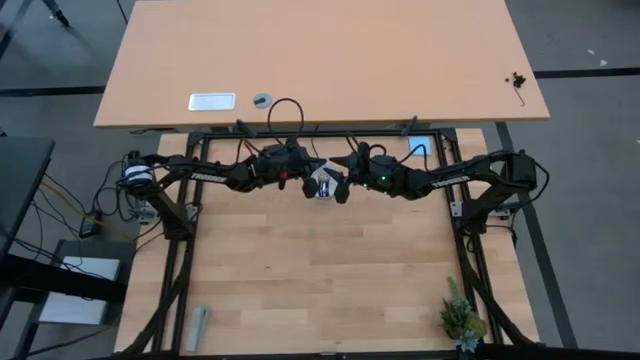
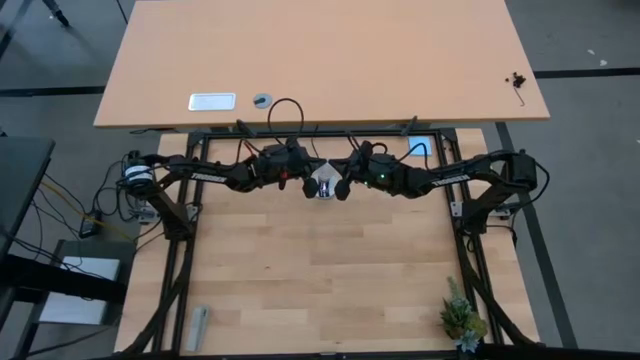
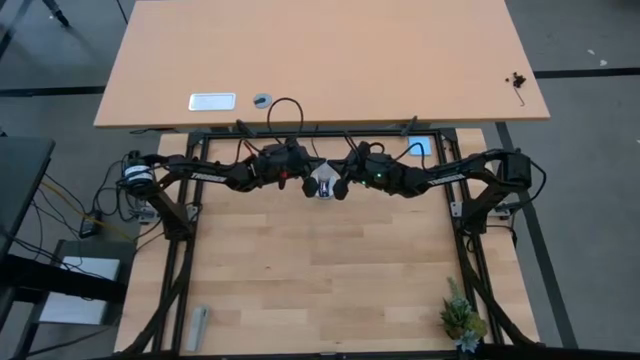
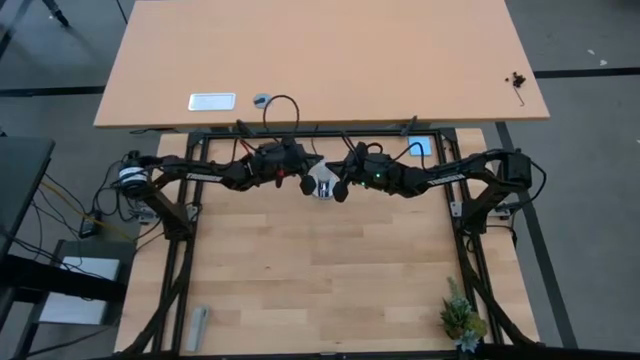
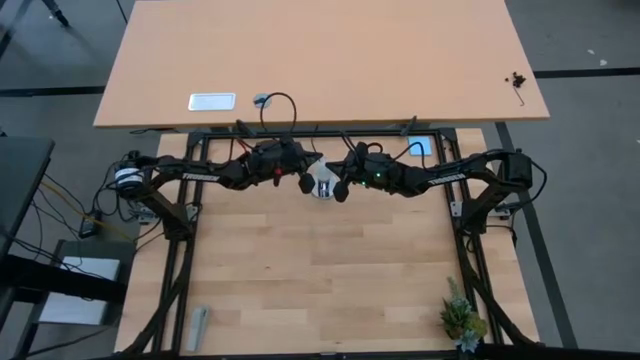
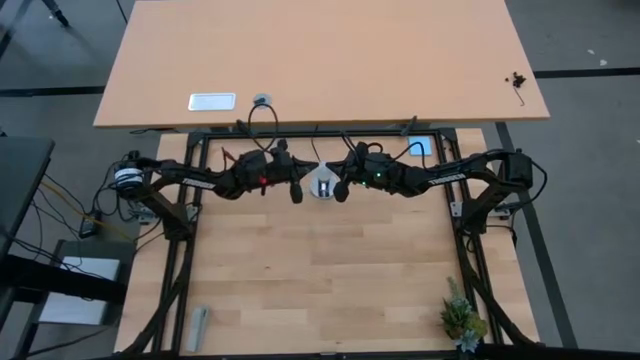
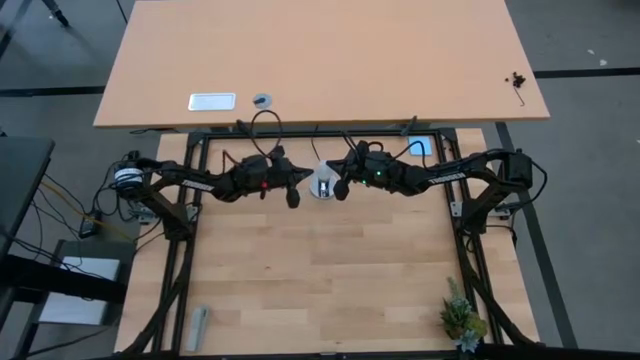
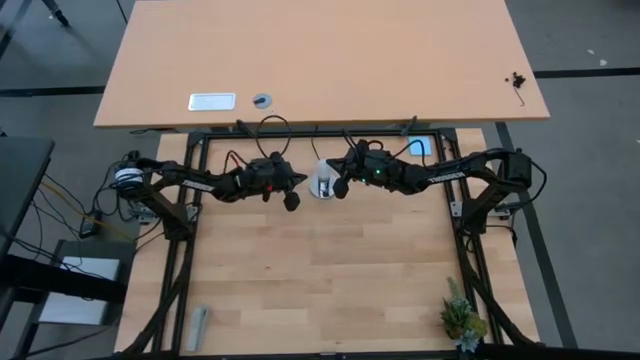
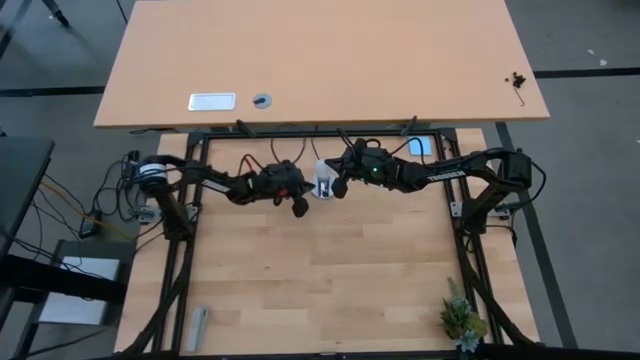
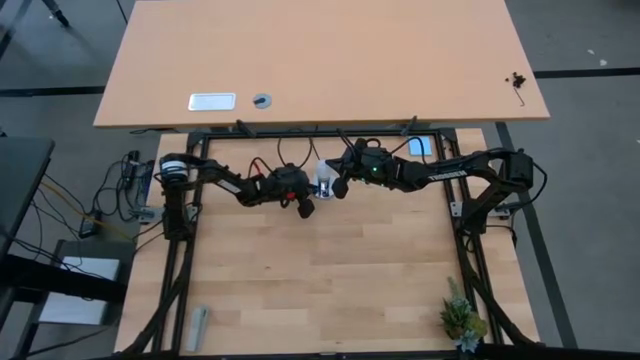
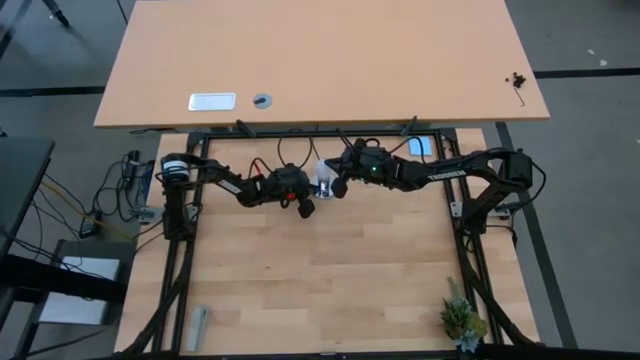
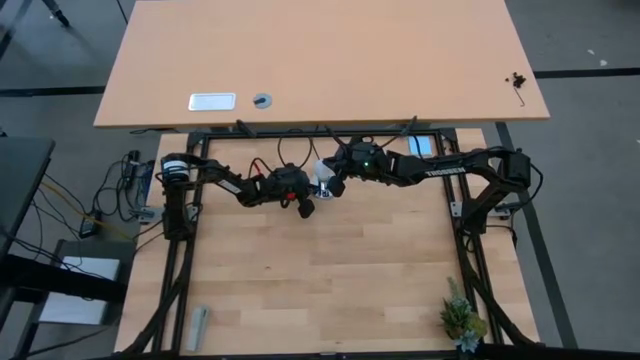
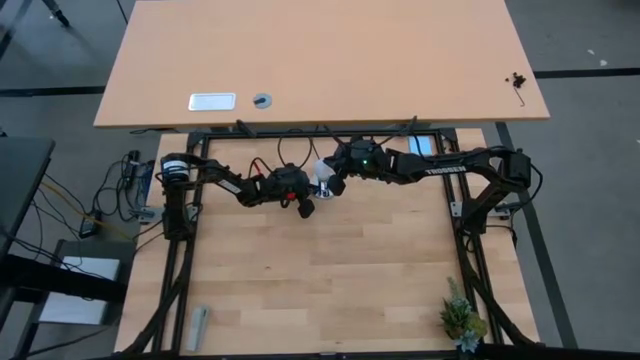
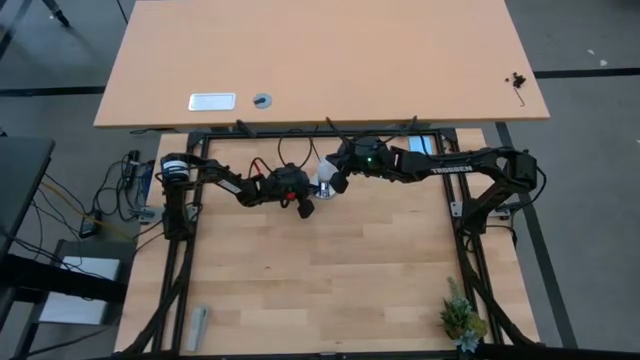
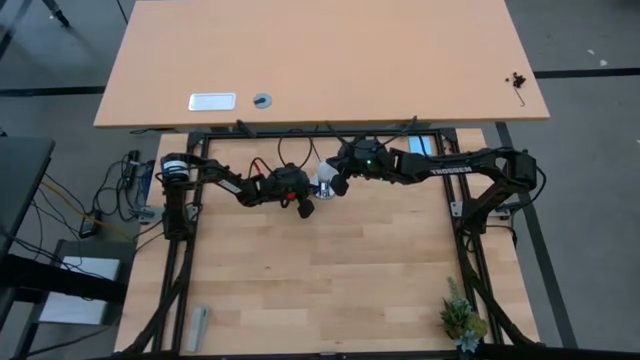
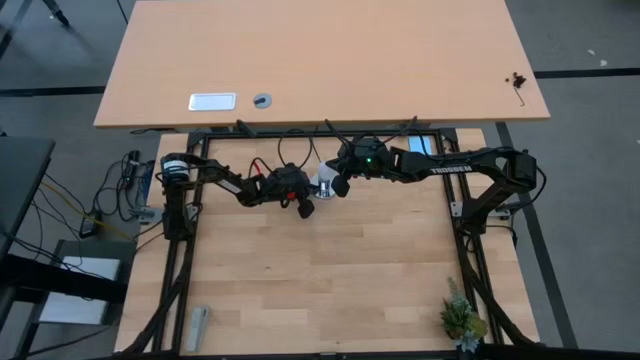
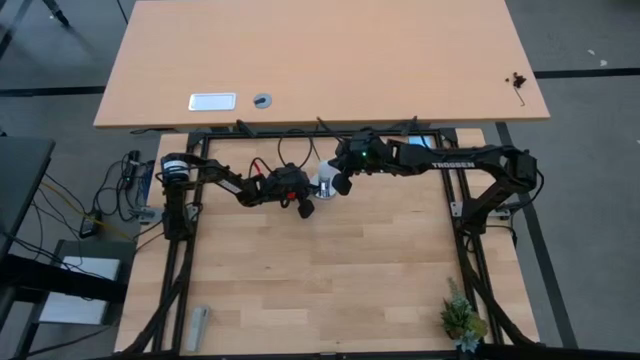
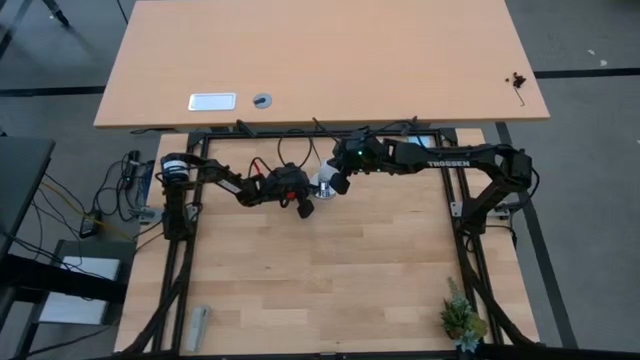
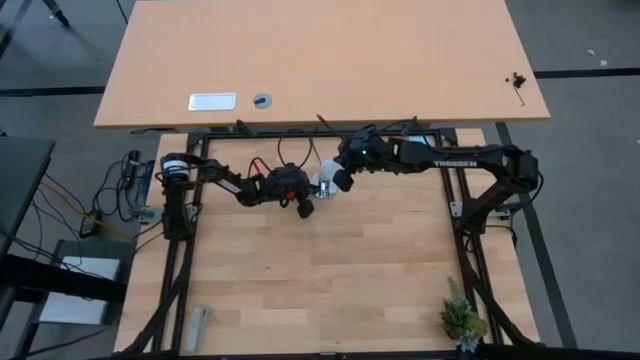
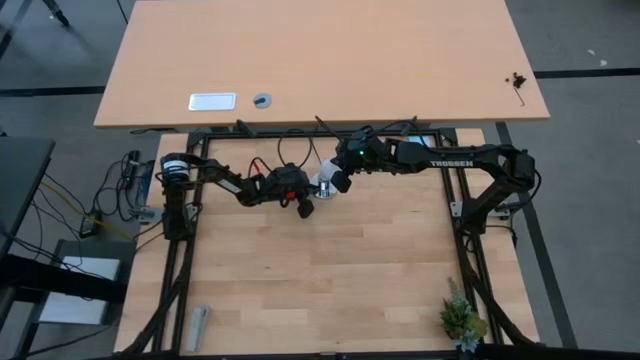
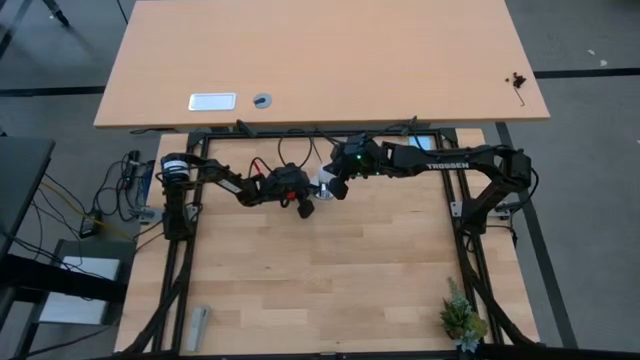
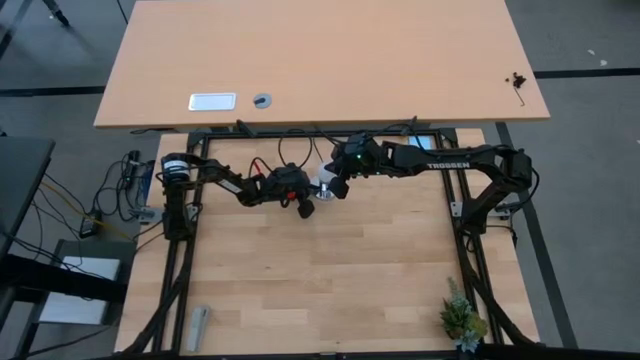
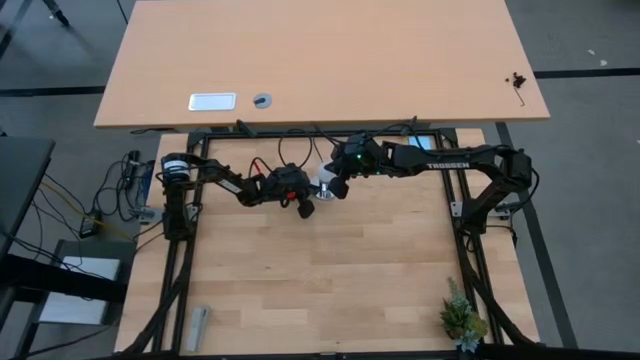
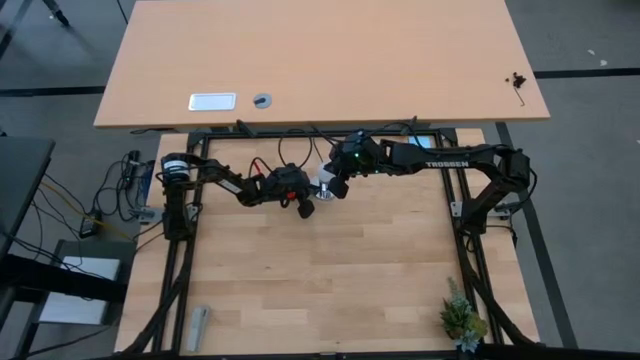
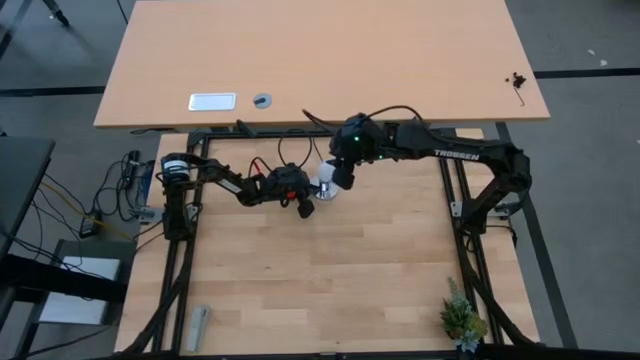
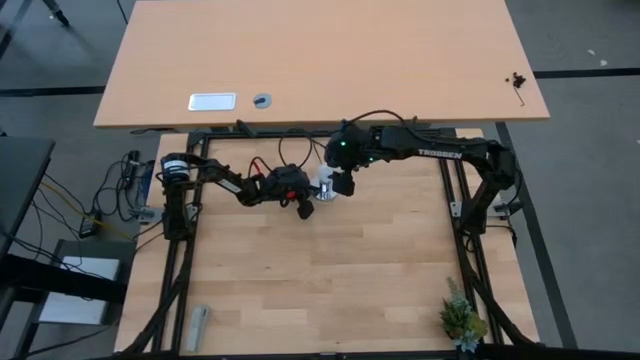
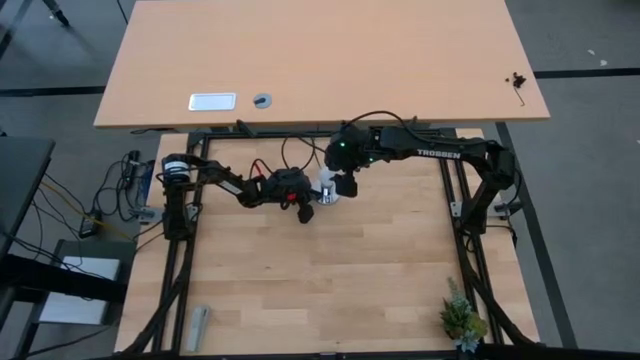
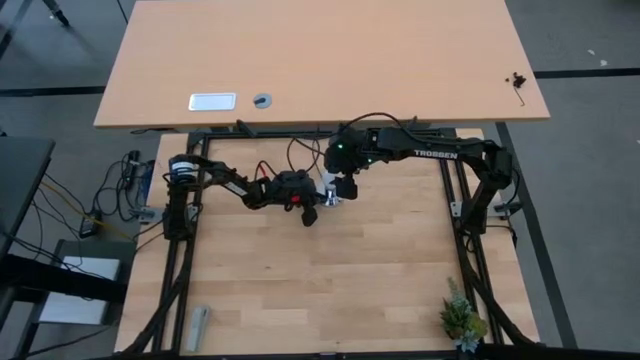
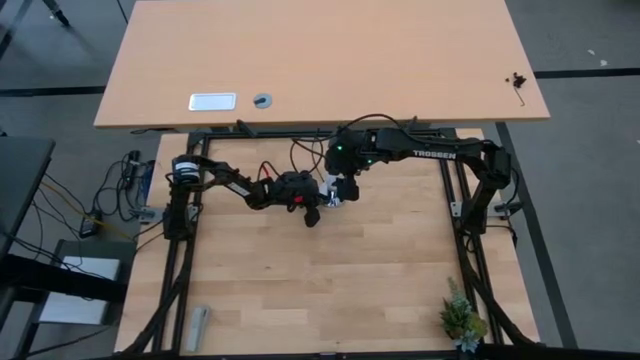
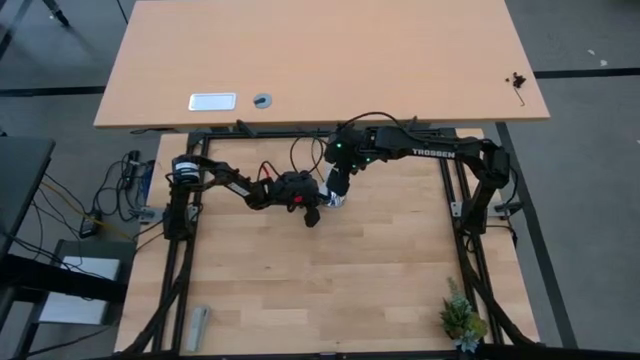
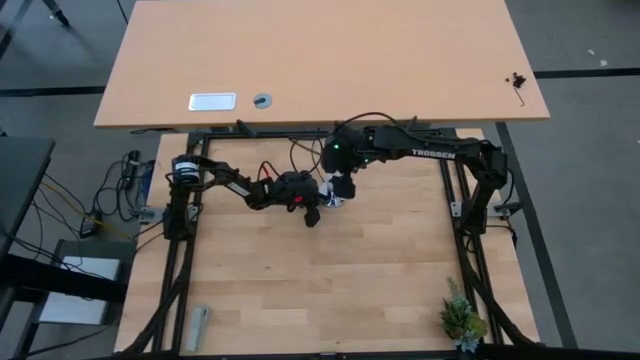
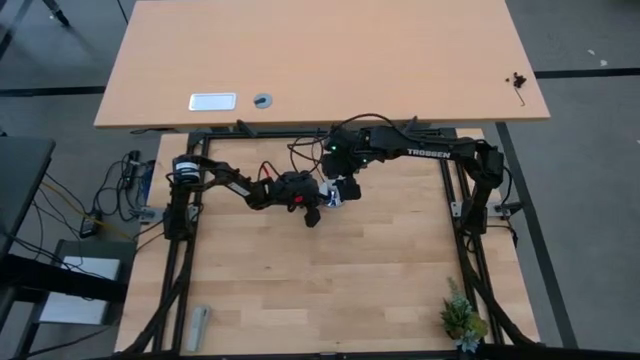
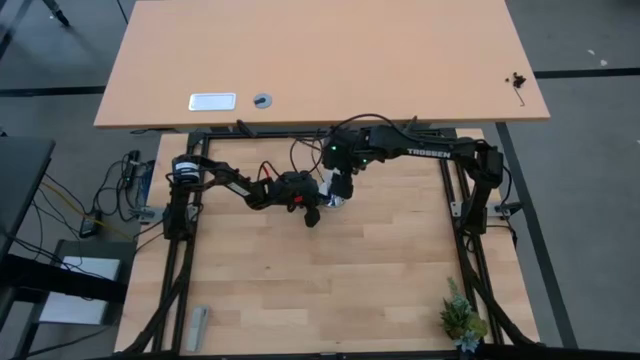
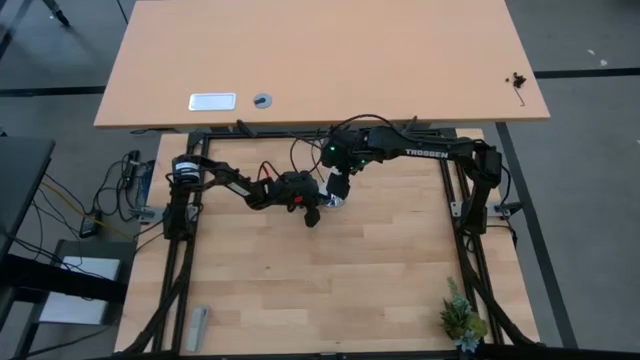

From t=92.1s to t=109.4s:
Task: Screw lightbulb
Insert the lightbulb into the lamp

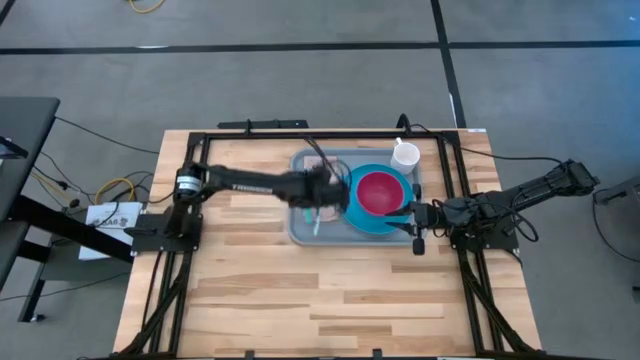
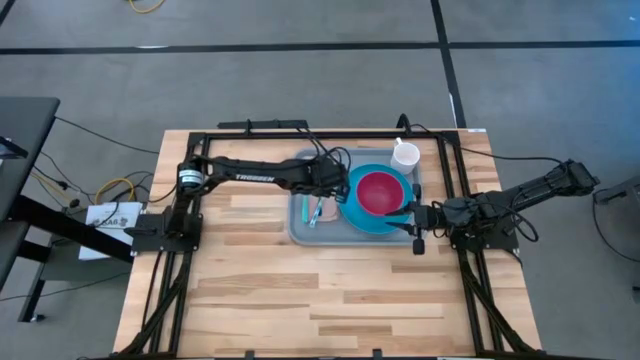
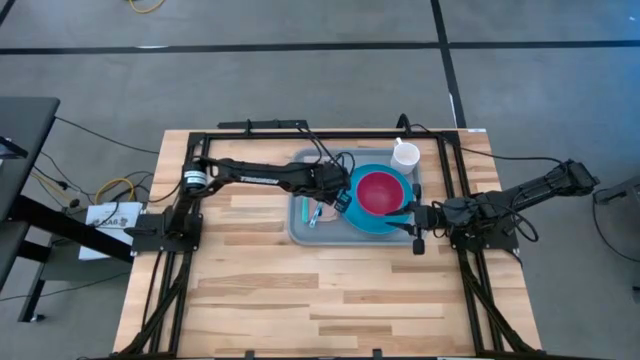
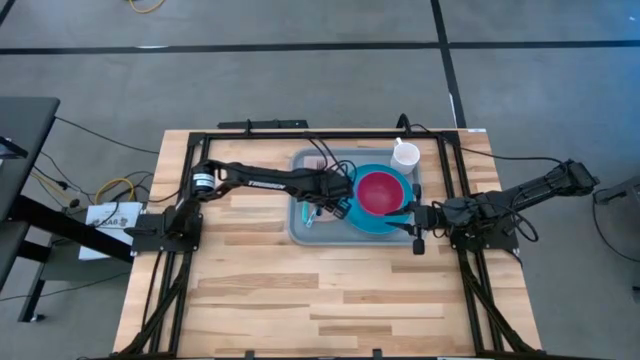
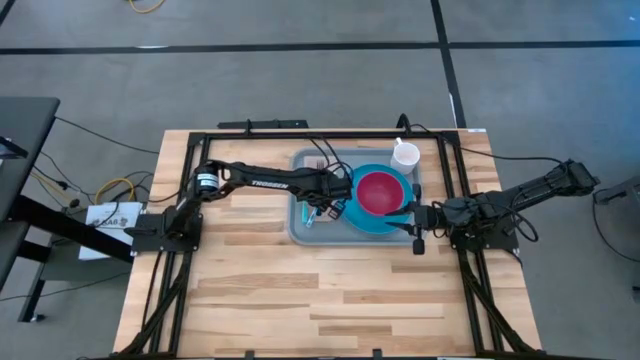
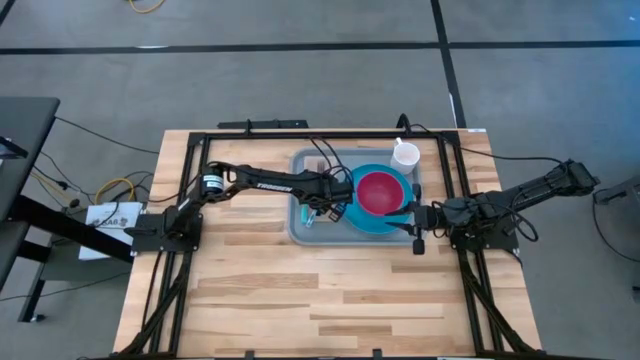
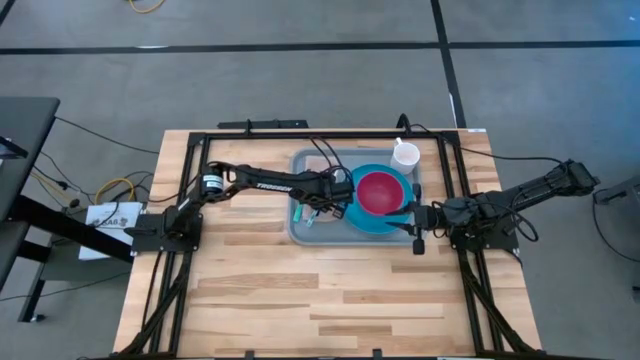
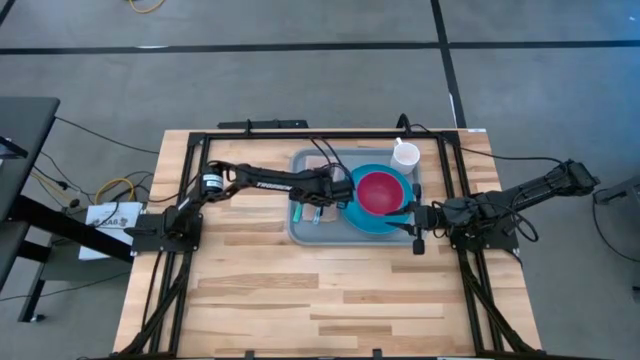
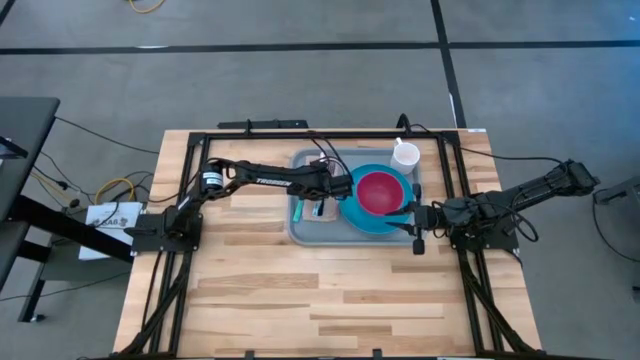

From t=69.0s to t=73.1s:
Task: Set up tray
Put the green table knife between the blue fork and the green spoon on the light brown napkin on the gray serving tray
